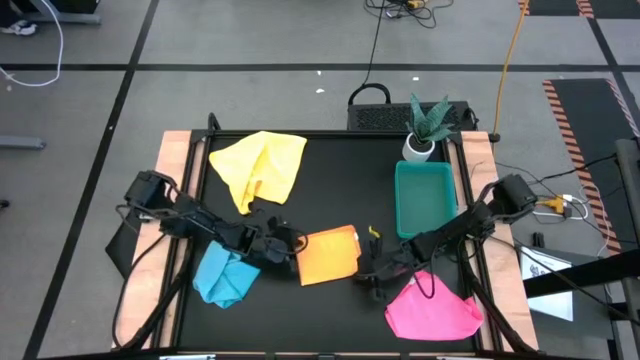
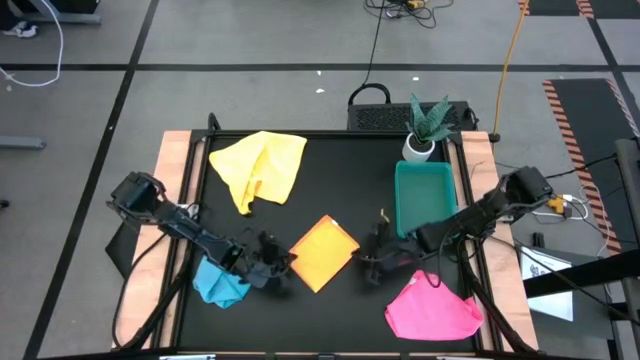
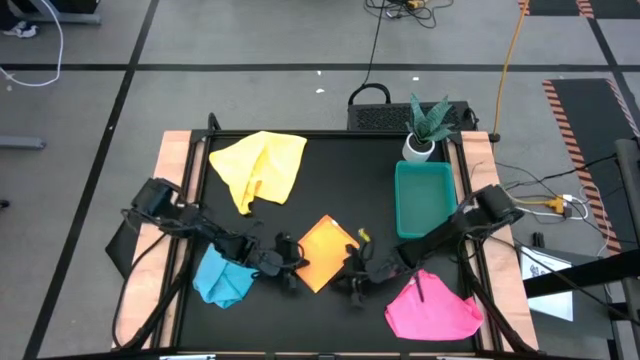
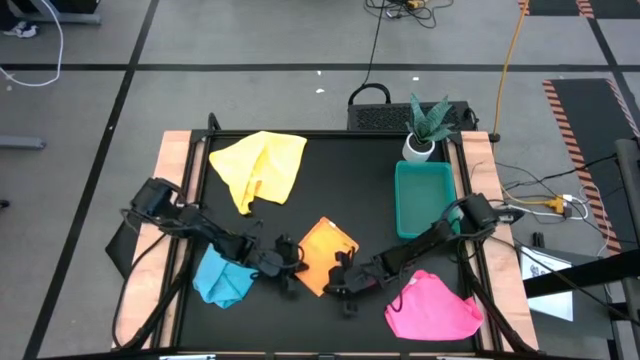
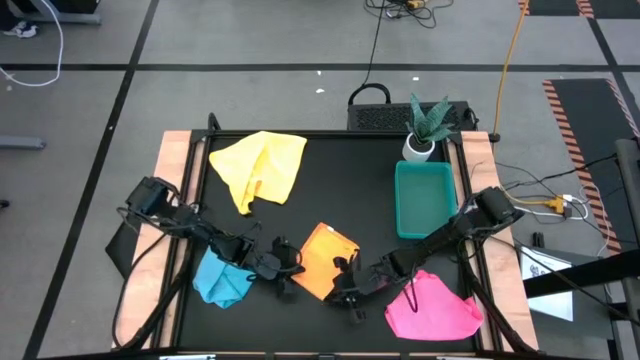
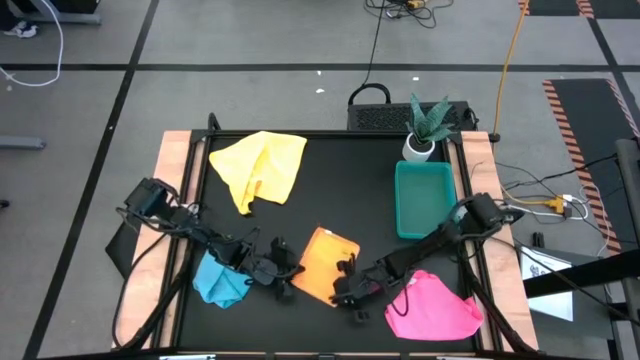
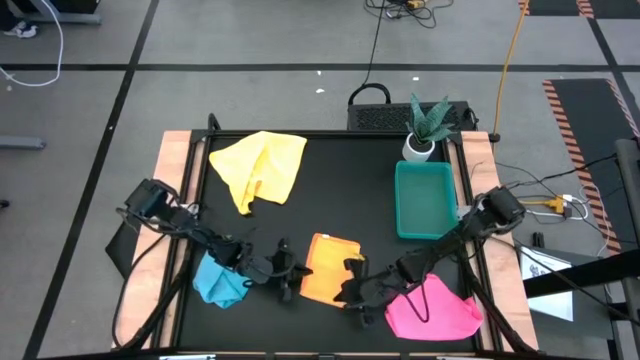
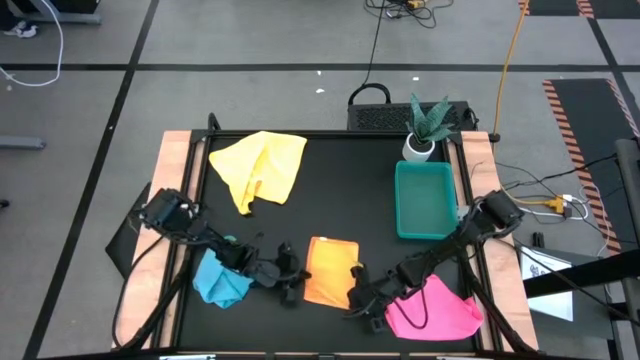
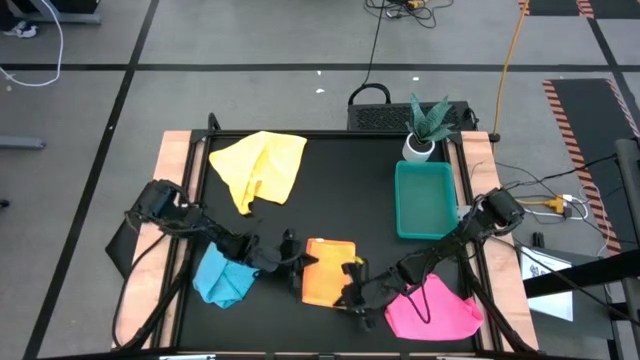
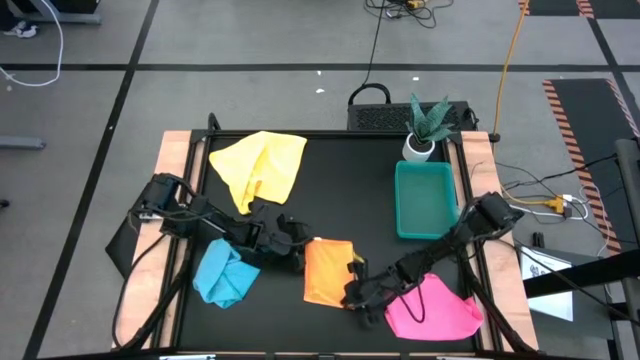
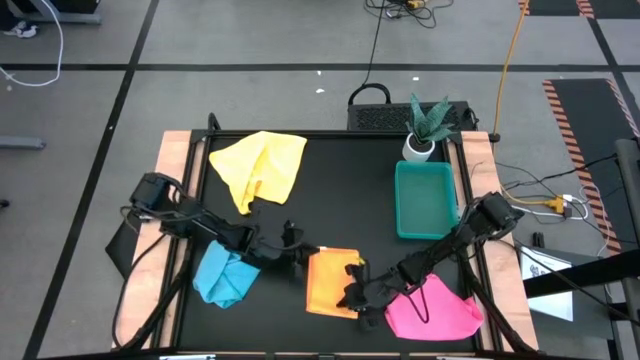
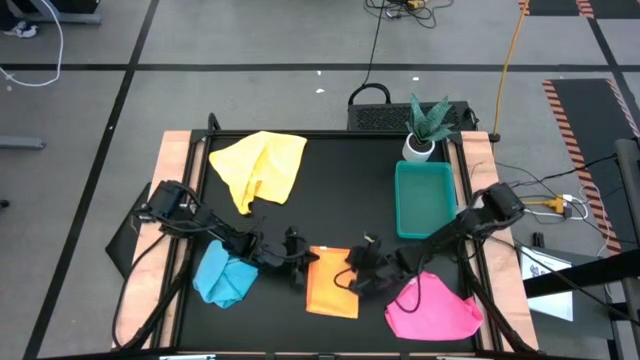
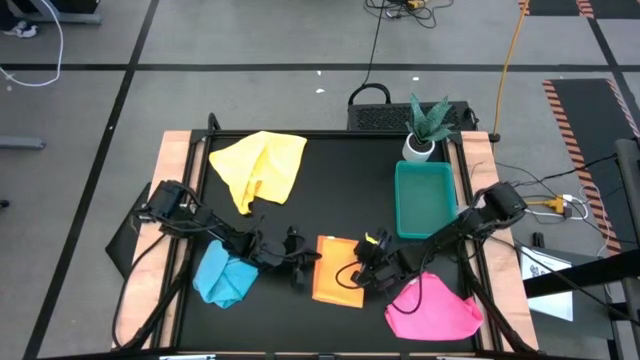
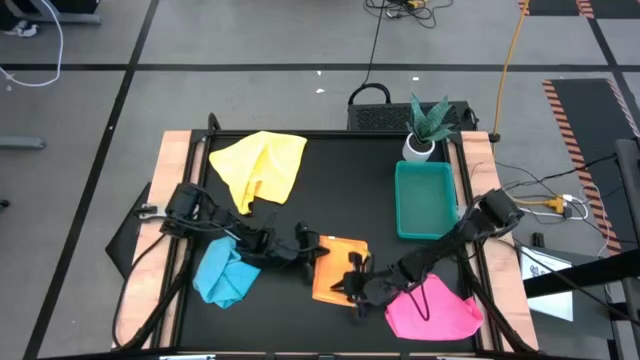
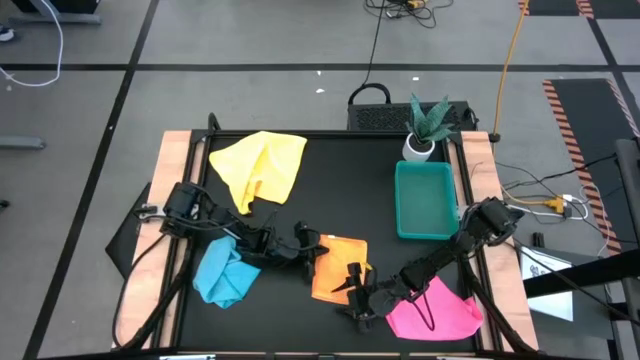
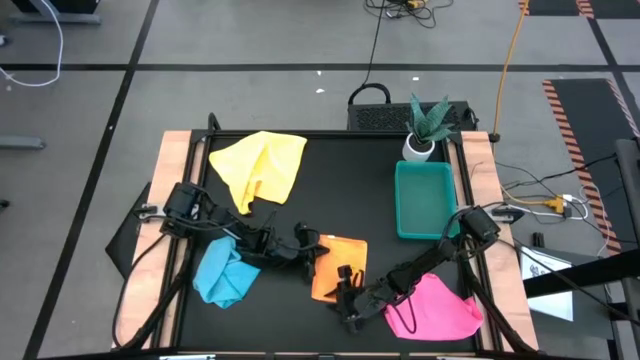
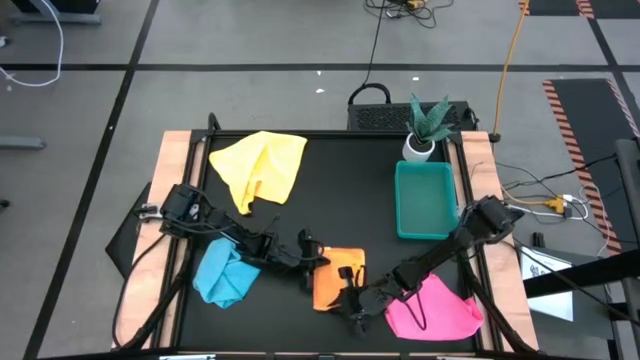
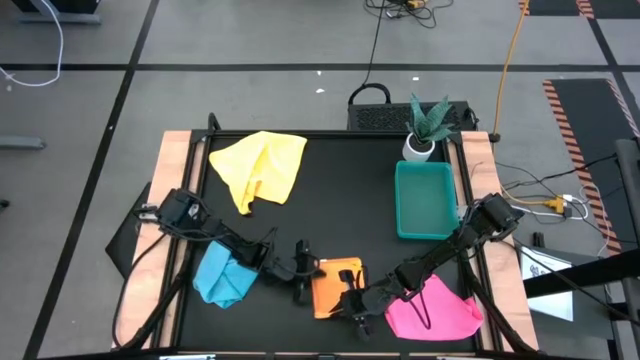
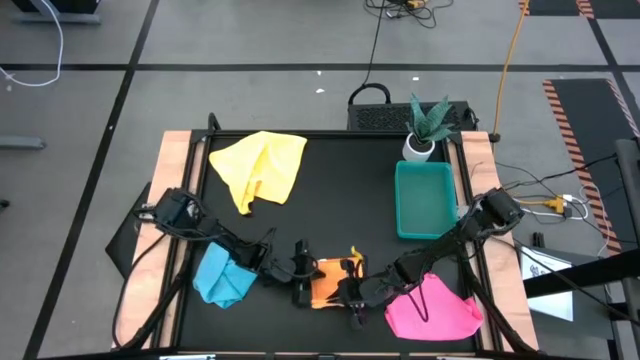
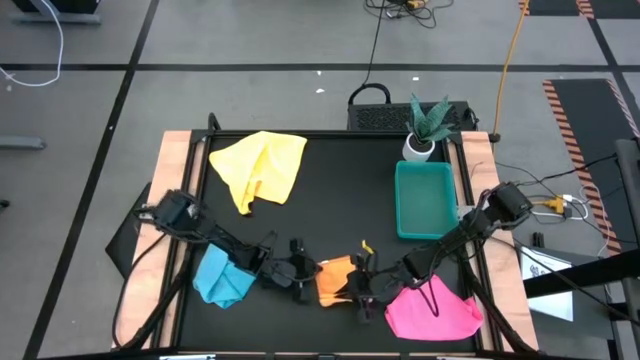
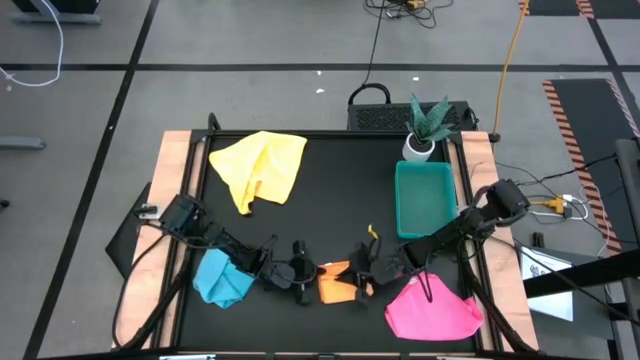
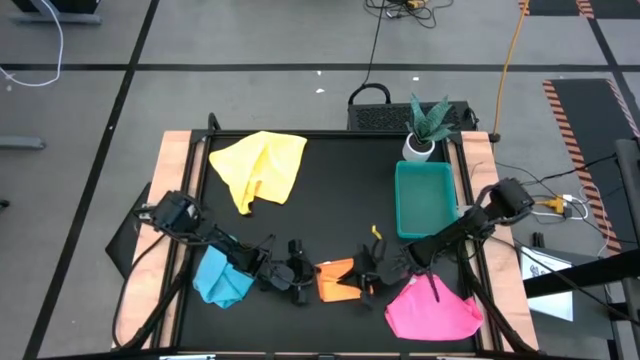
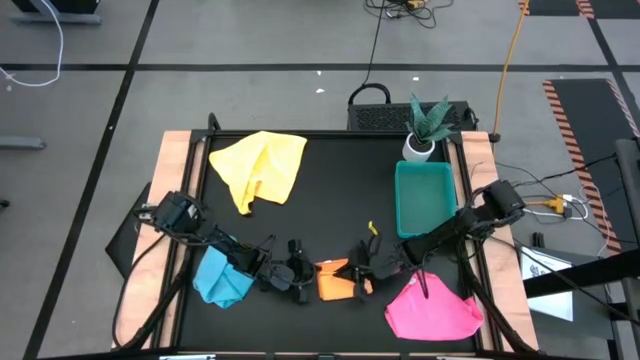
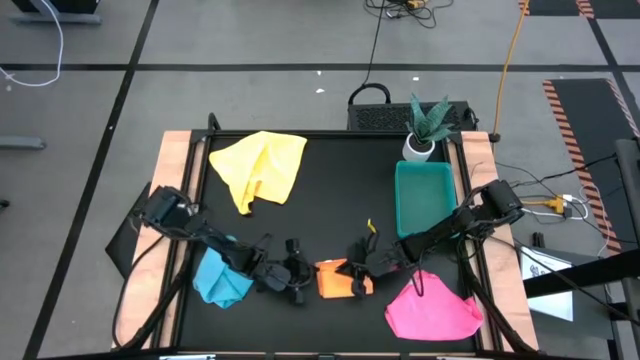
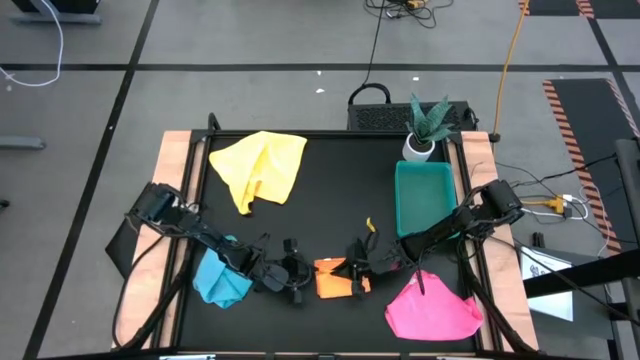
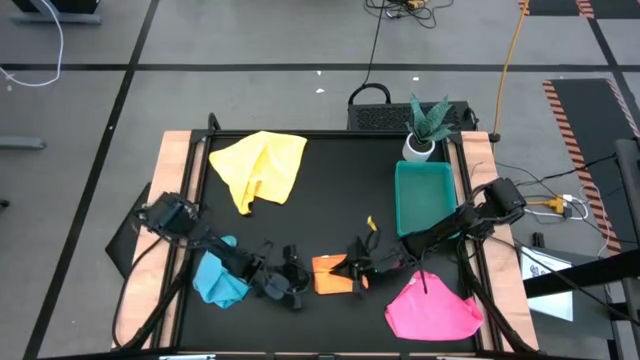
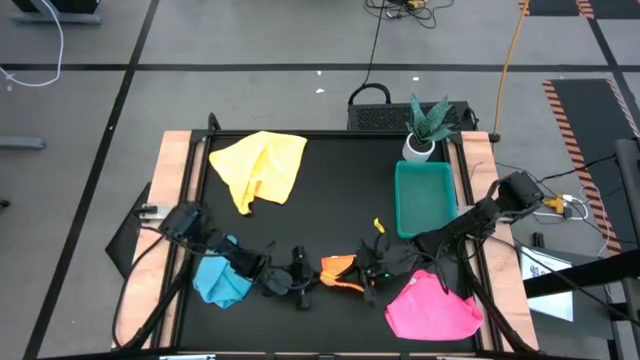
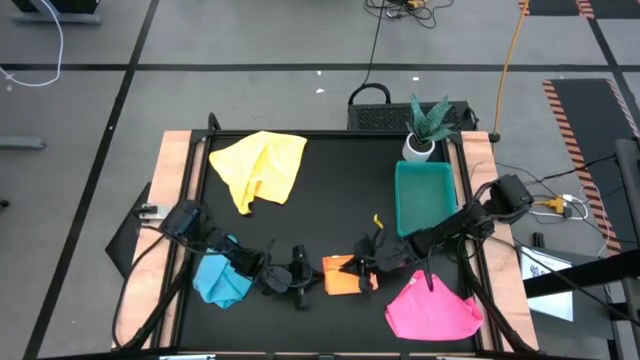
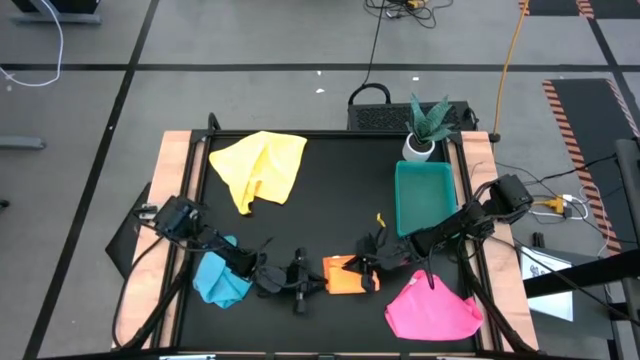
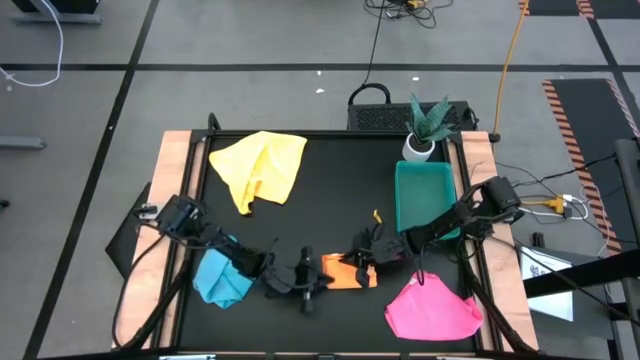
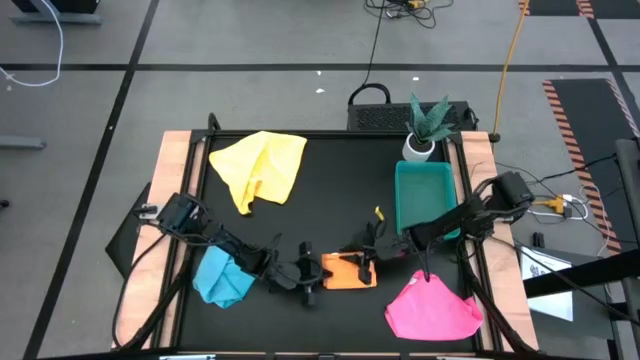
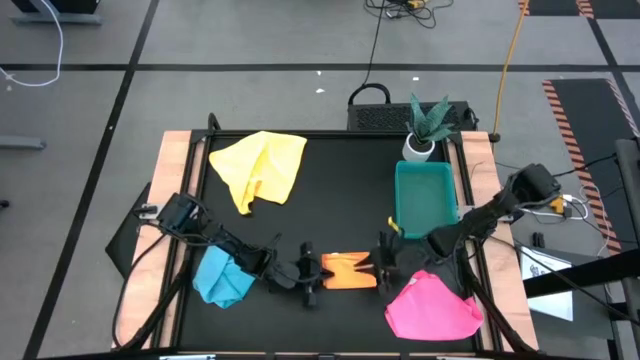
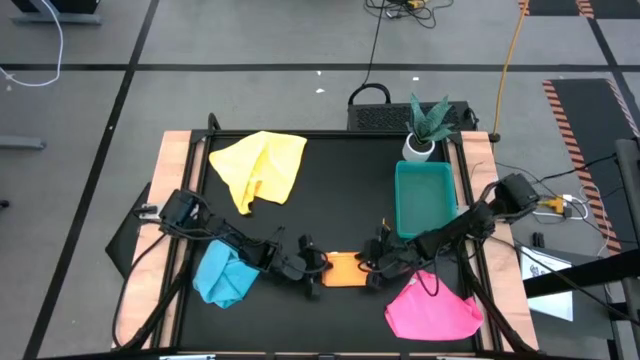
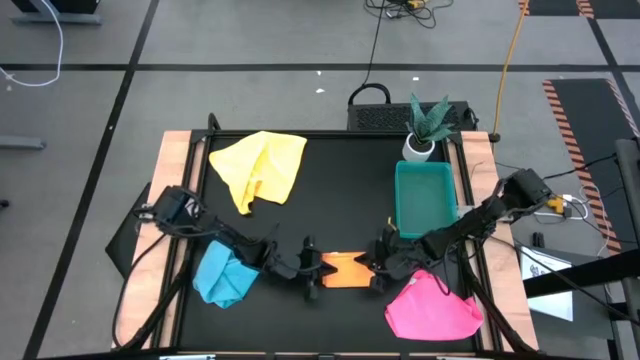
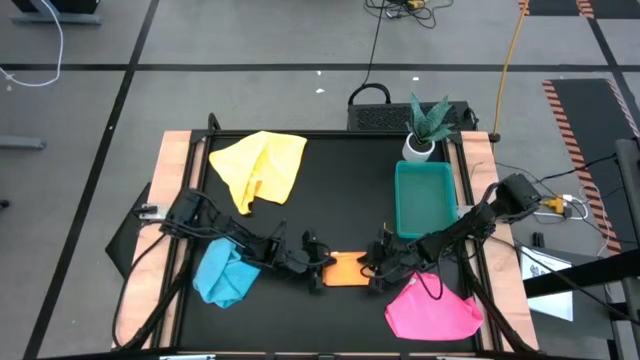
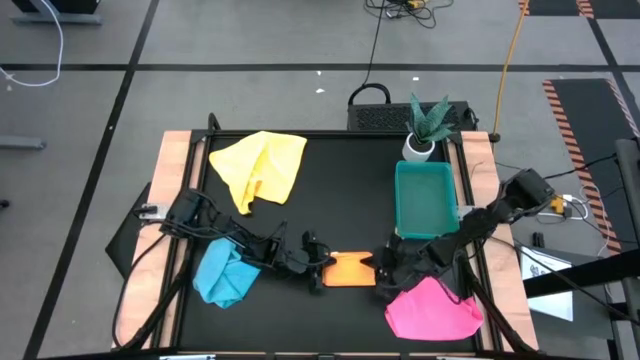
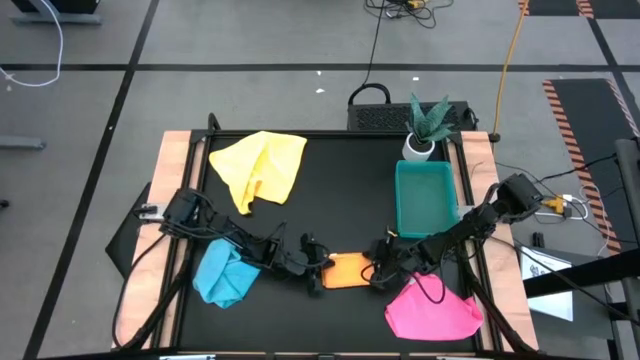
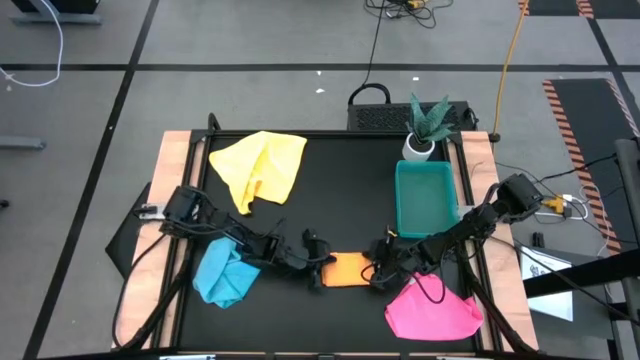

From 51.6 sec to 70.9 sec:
Task: Fold microfiber towels
Fold the orange microfiber cloth

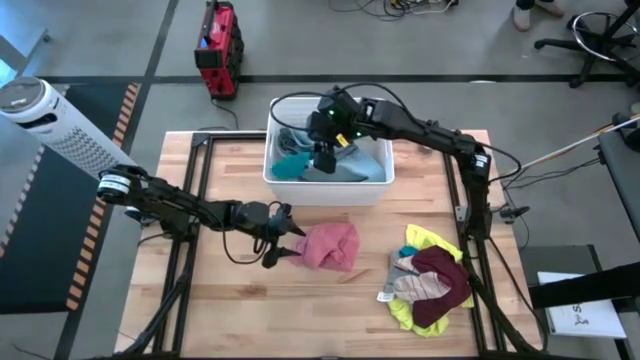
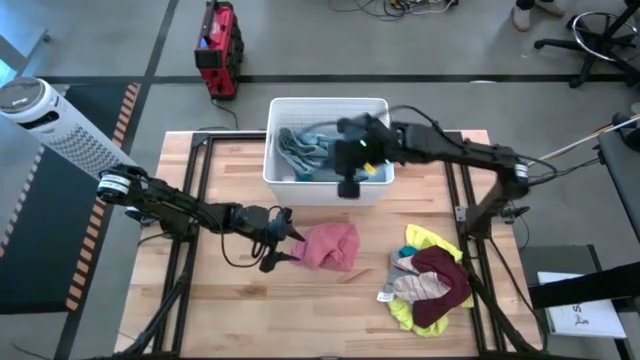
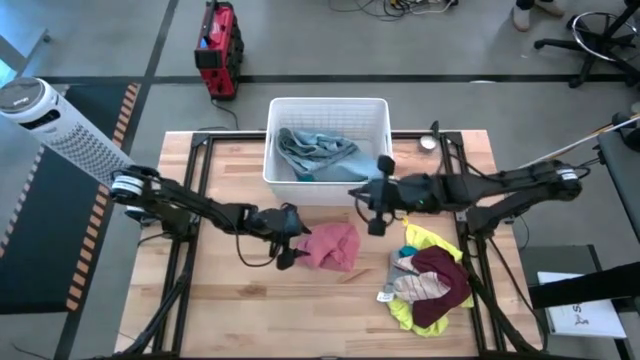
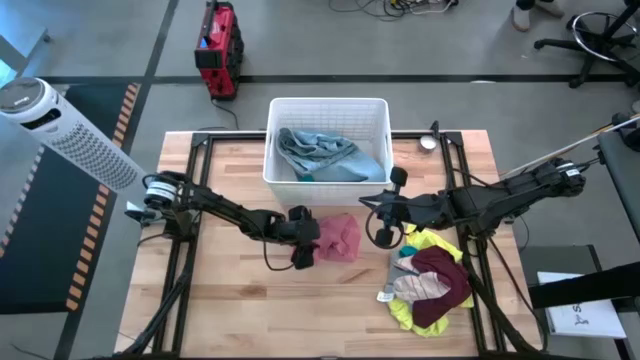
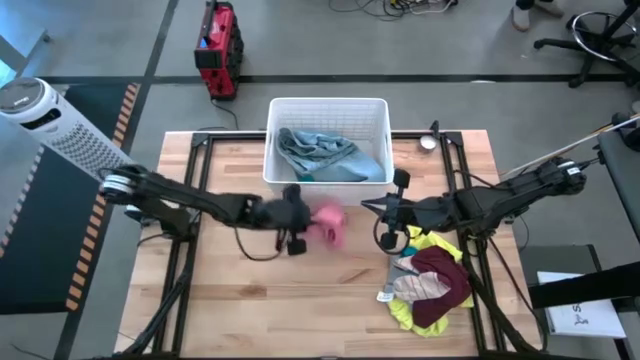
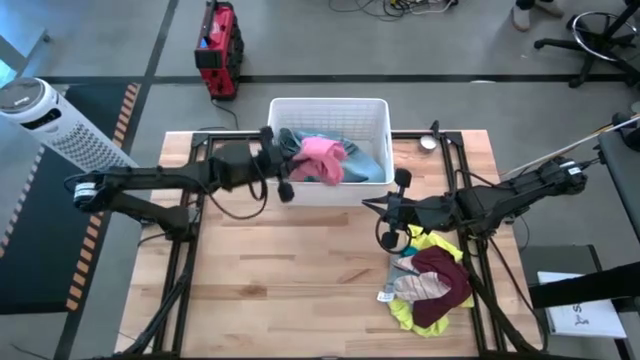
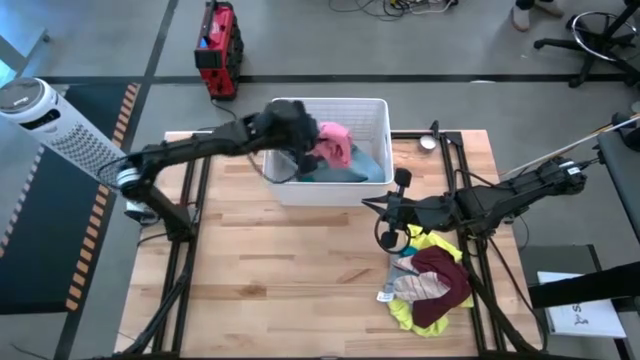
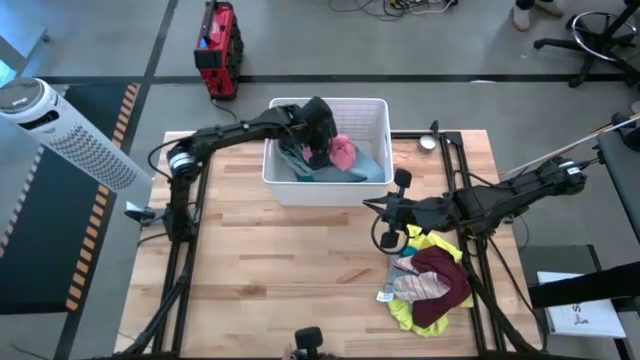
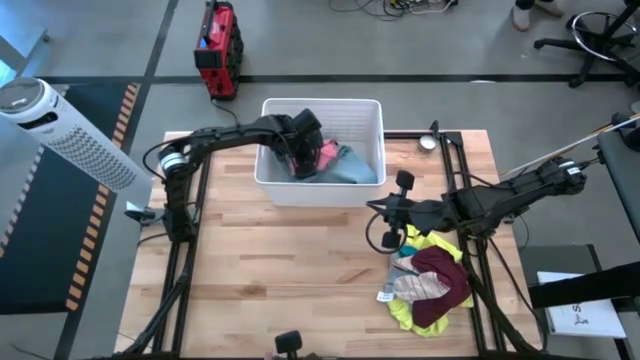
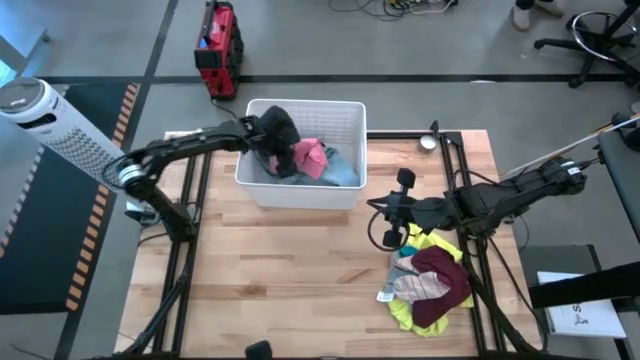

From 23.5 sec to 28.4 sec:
Task: Sort clothes
Put the pink shirt into the white bin
